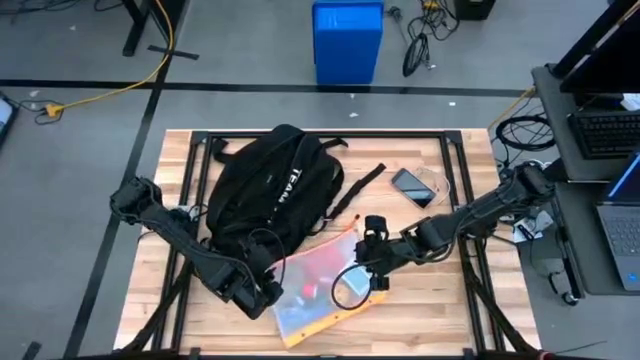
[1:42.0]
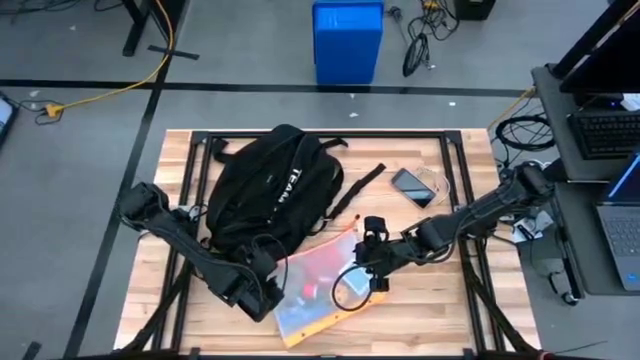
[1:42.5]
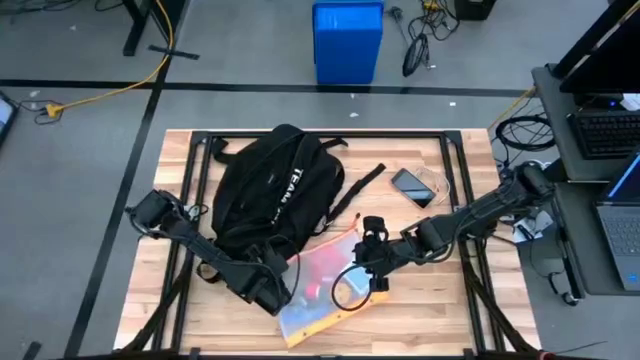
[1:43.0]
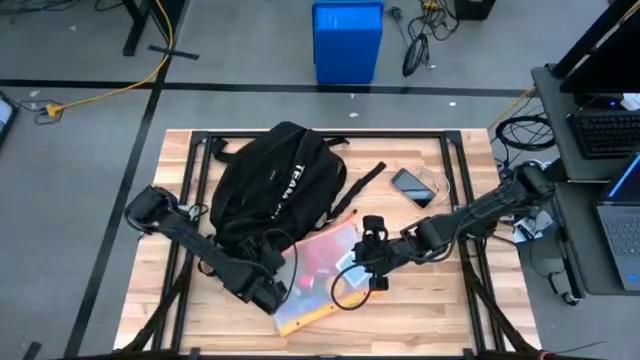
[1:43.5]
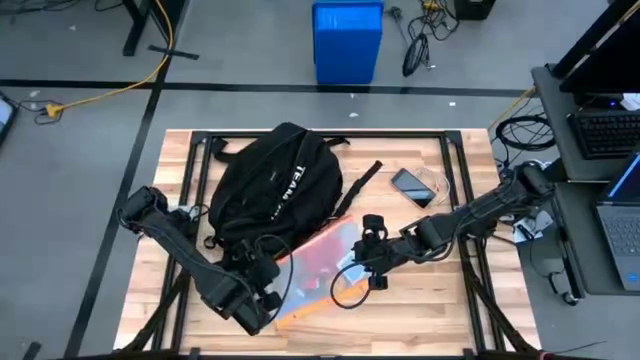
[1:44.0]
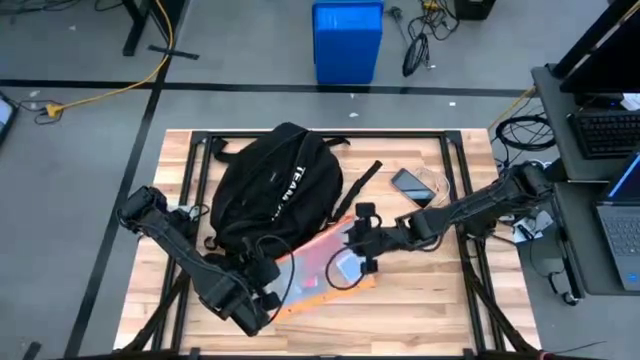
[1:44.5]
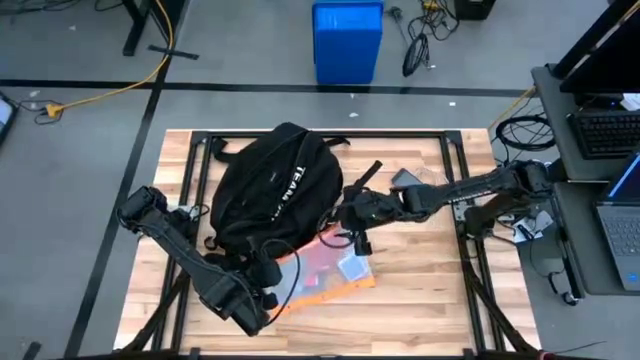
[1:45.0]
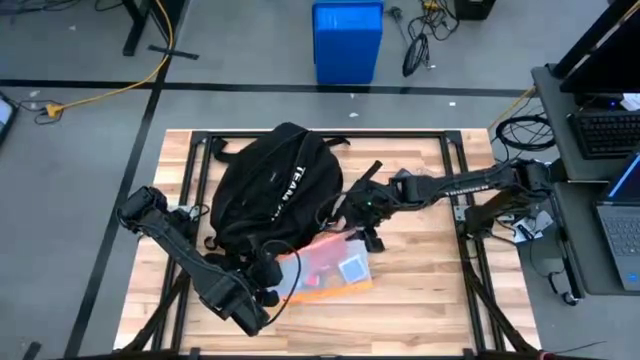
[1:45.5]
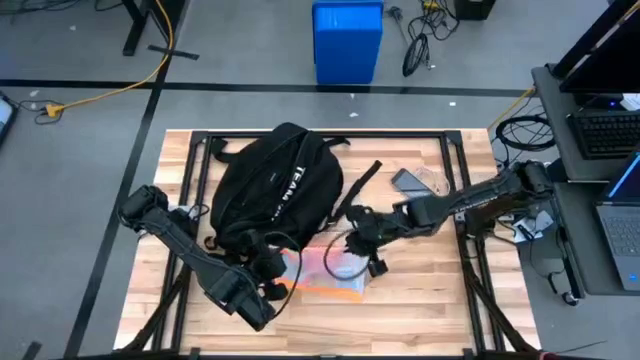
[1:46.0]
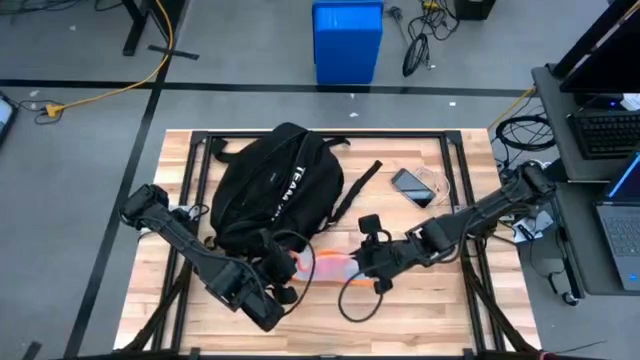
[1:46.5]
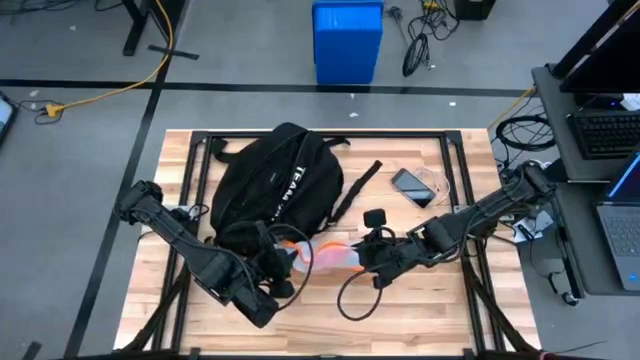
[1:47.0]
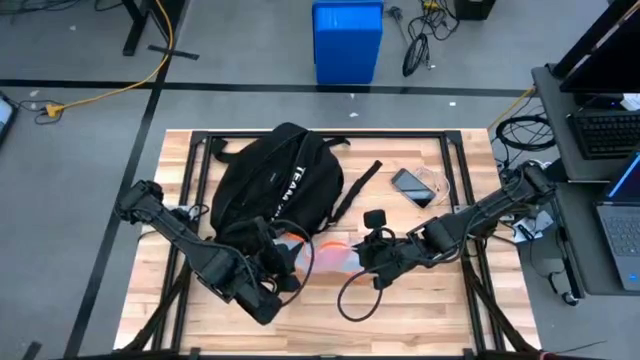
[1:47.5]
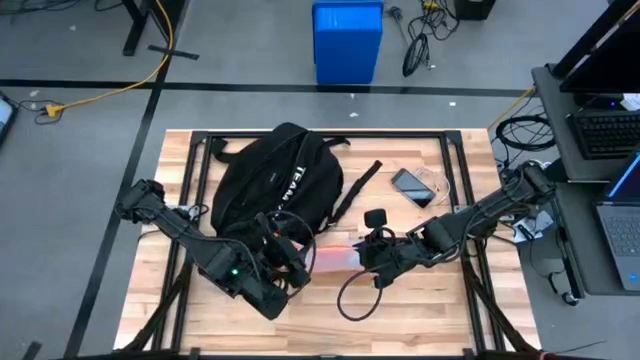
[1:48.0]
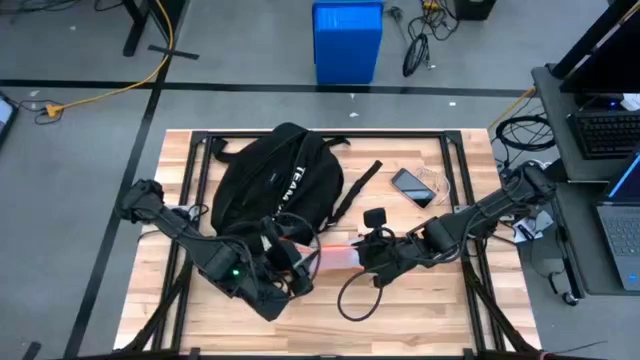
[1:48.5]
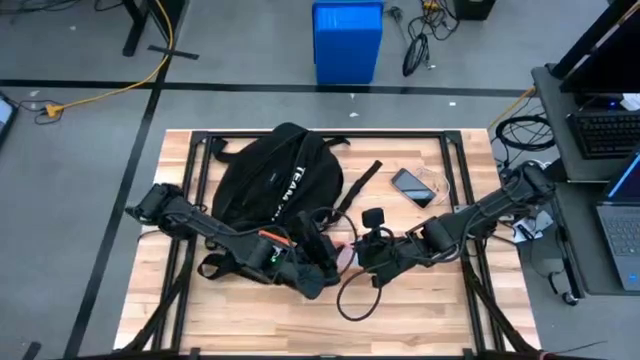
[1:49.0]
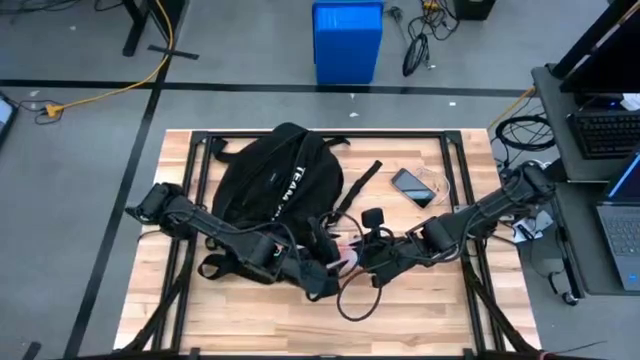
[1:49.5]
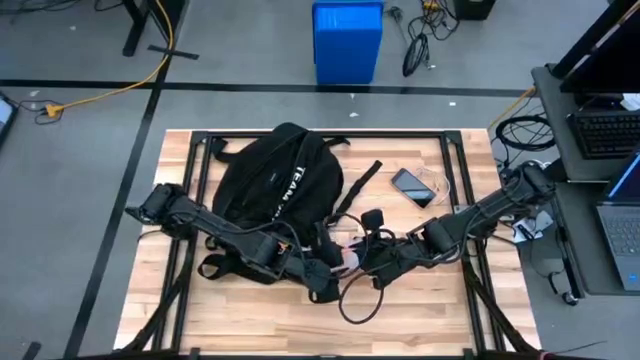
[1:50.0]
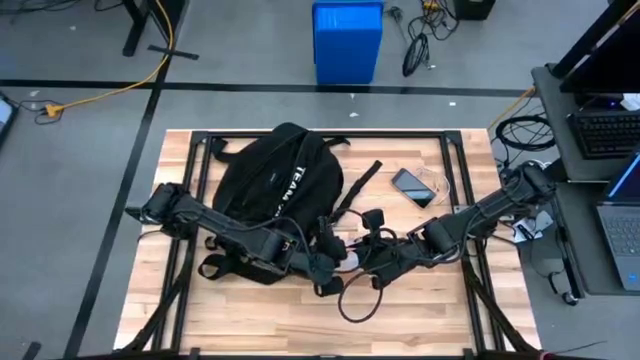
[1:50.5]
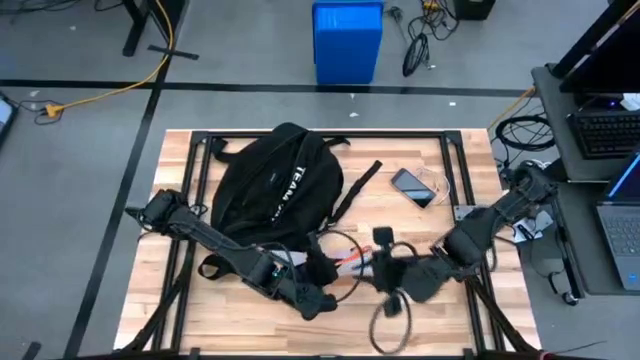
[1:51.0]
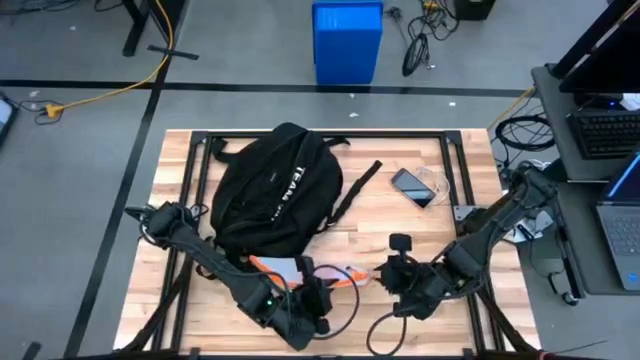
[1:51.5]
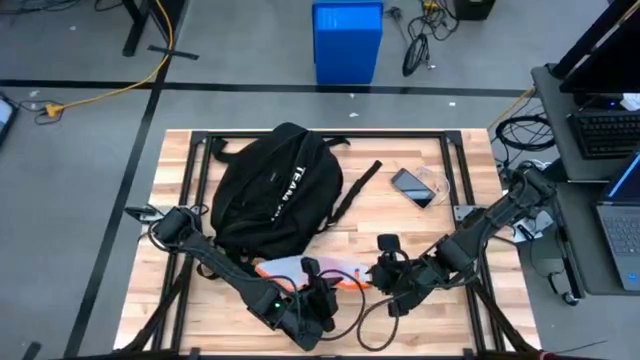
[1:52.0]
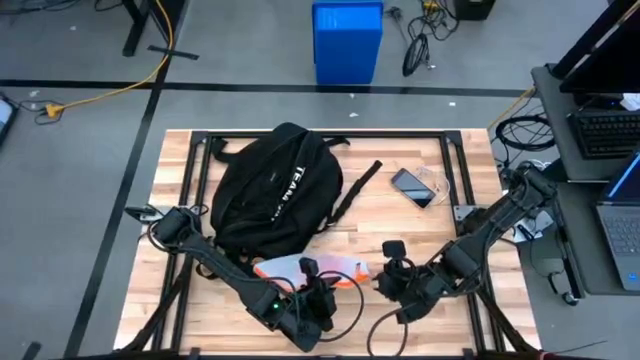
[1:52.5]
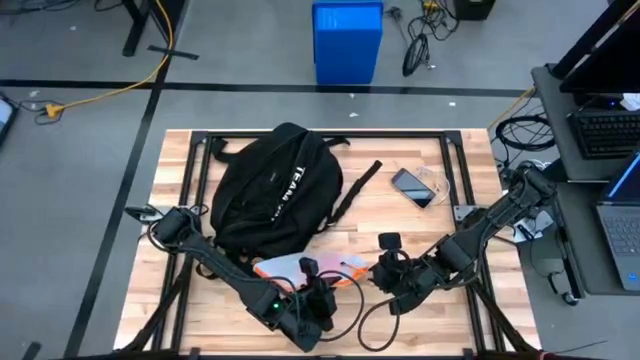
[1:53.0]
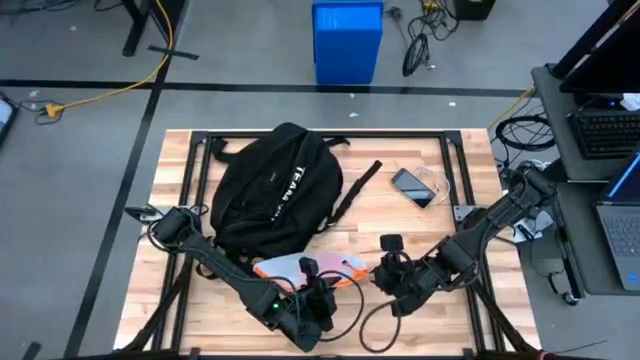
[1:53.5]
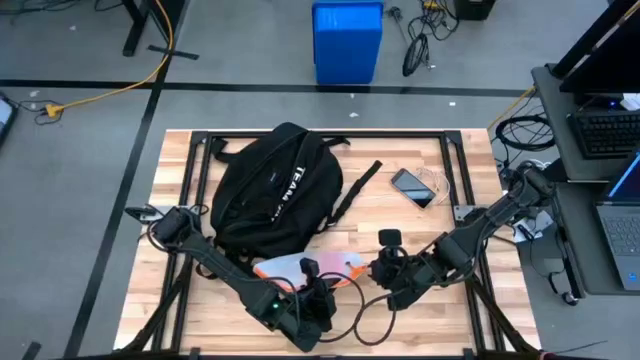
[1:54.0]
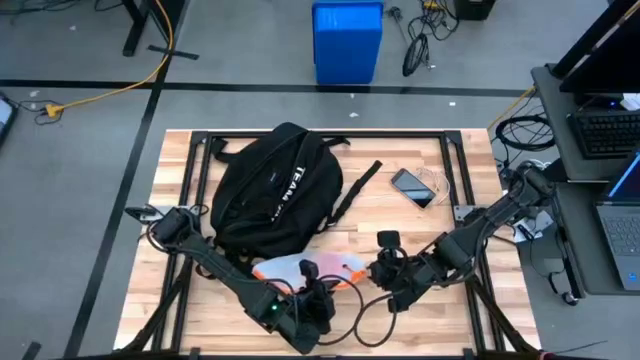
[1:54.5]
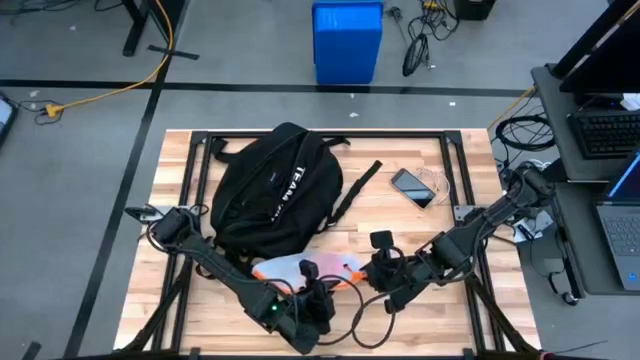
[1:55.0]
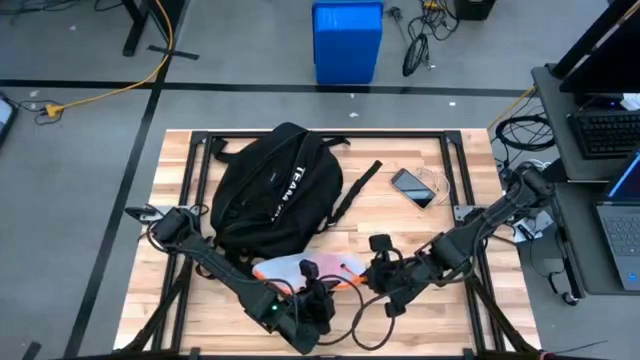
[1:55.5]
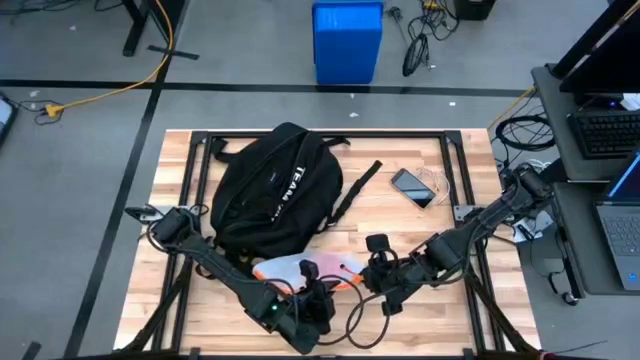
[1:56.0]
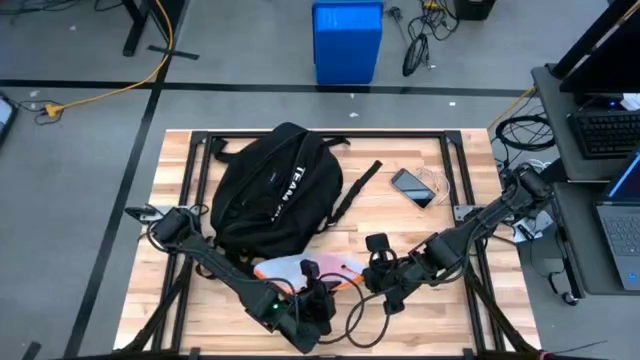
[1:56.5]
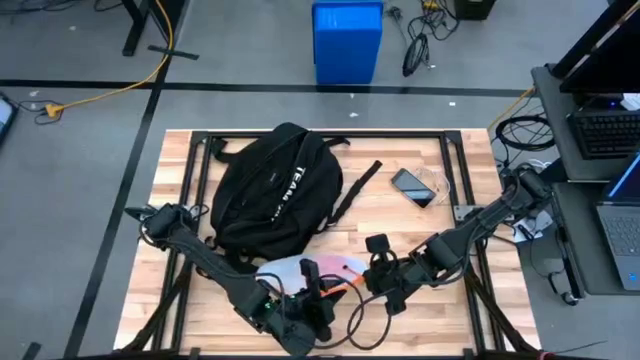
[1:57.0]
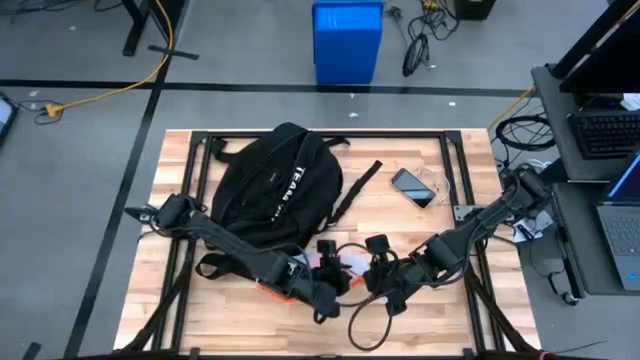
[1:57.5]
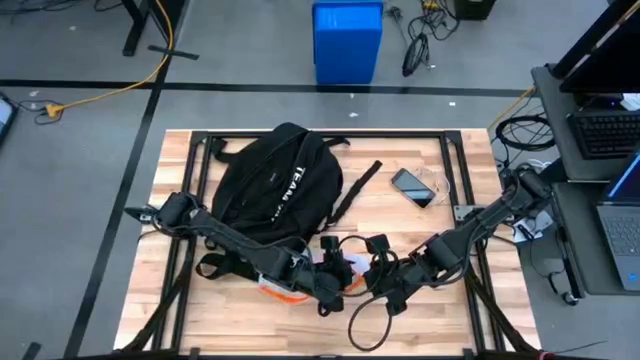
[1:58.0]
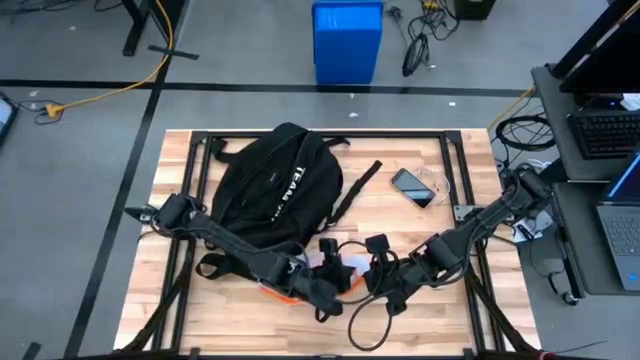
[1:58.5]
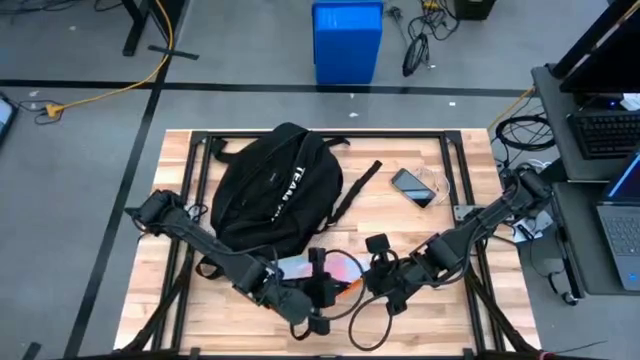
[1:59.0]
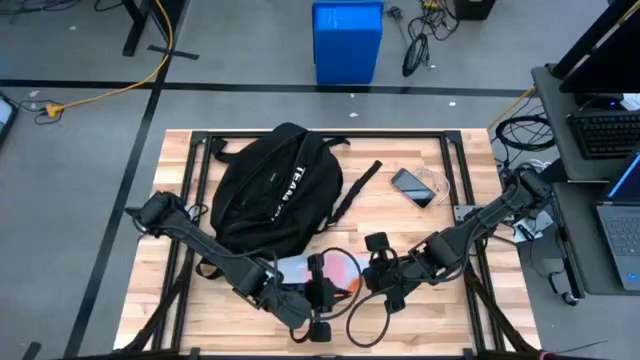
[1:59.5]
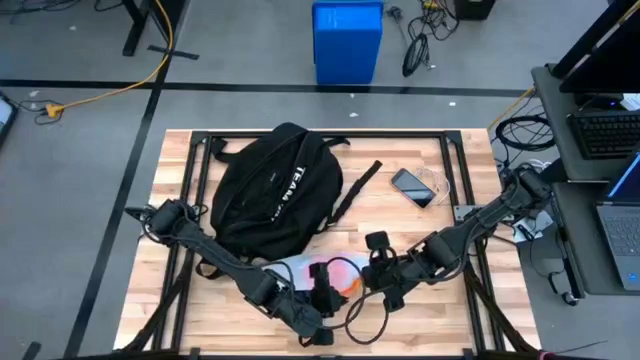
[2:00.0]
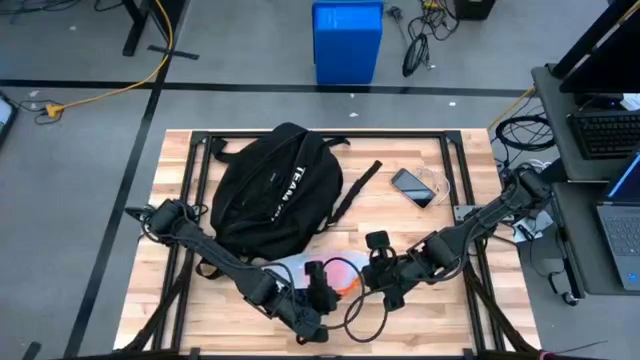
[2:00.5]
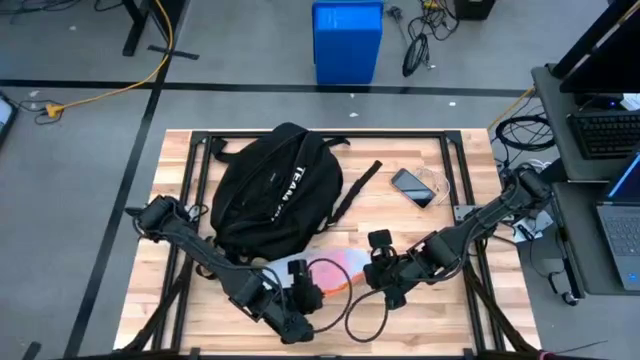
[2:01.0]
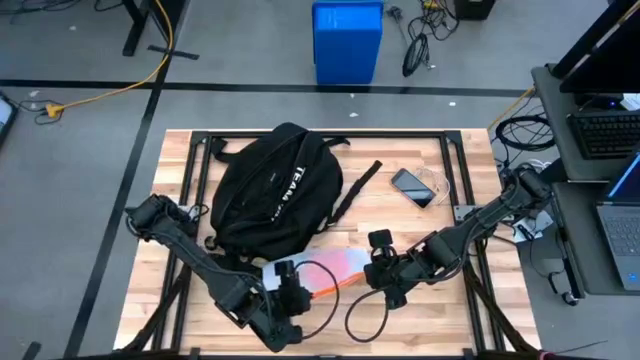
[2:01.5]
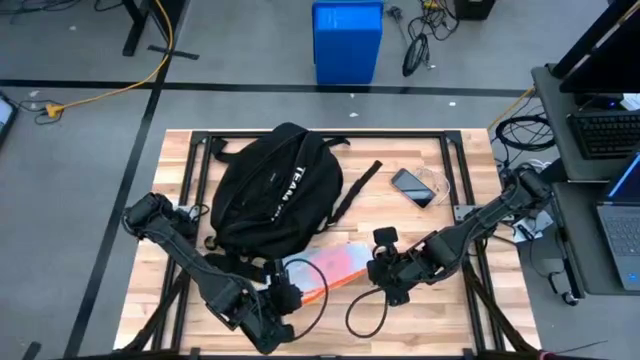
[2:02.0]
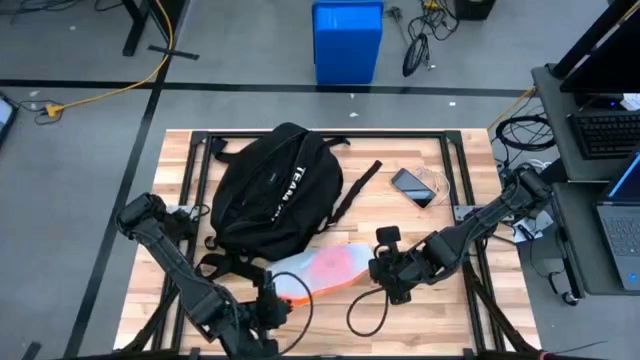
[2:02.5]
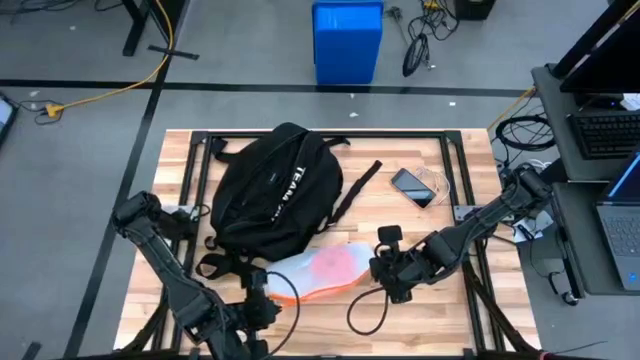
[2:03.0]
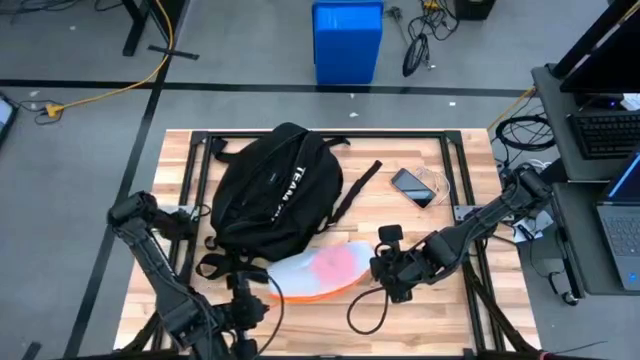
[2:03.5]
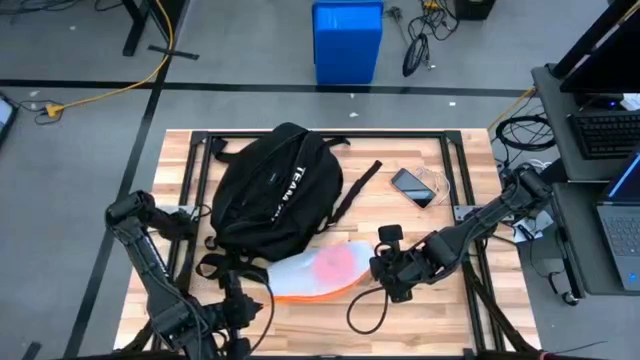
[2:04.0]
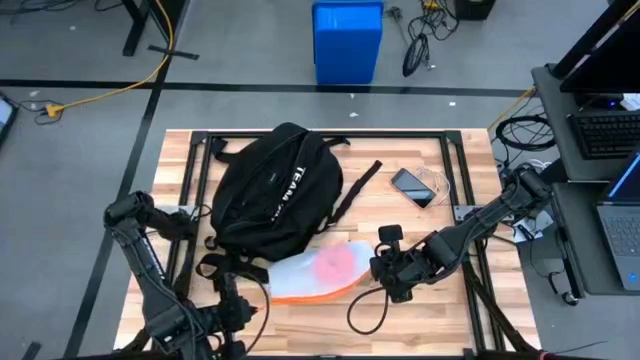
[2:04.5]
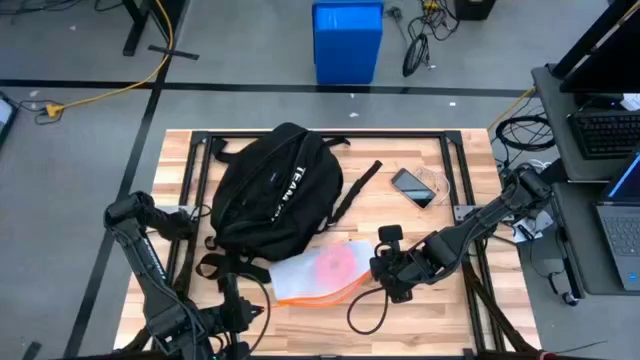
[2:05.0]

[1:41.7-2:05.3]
Task: Unpack backpack
Open the orange zip bag
